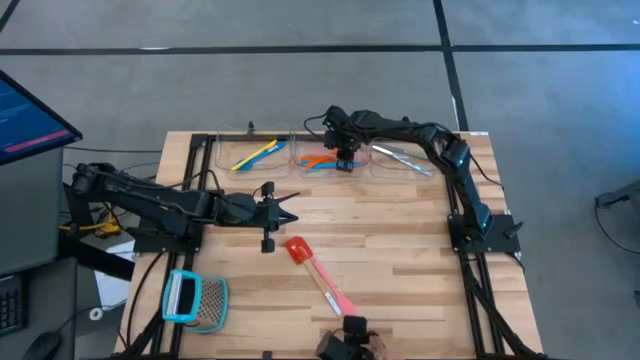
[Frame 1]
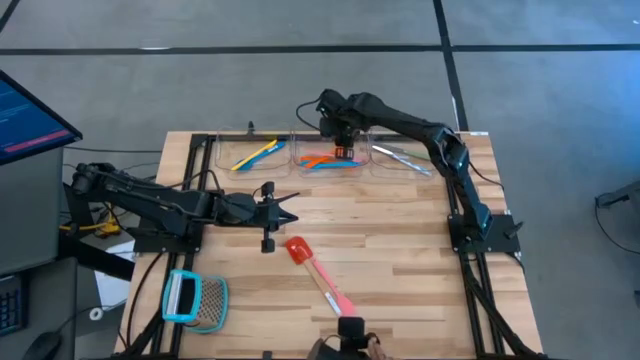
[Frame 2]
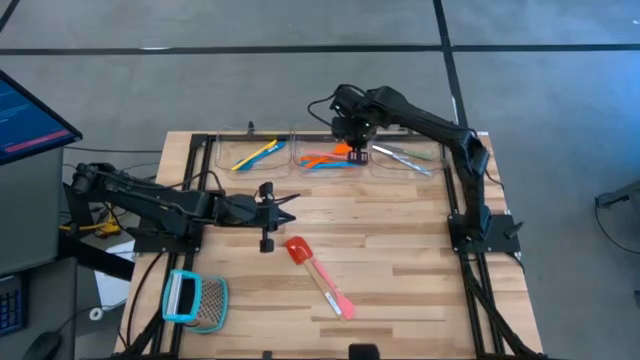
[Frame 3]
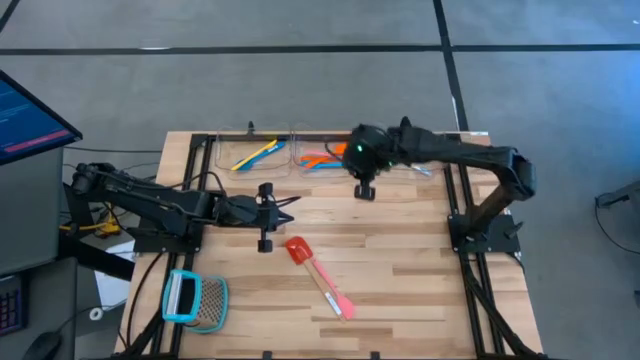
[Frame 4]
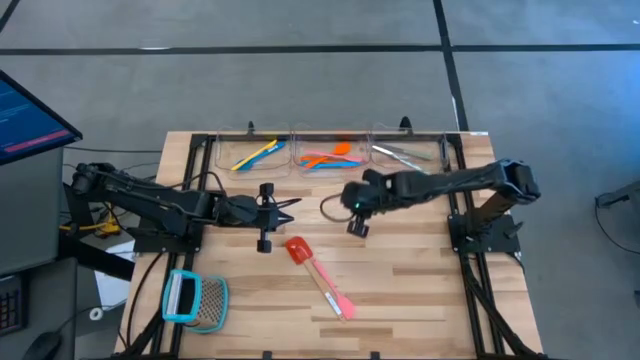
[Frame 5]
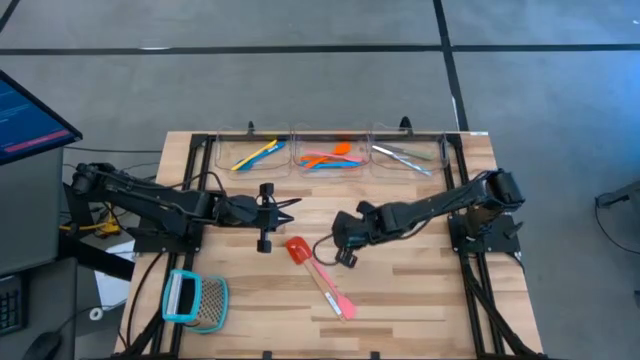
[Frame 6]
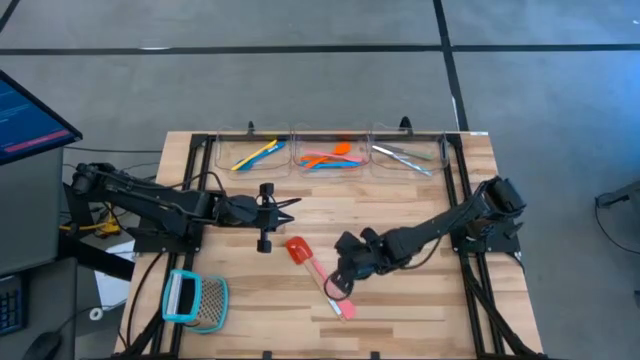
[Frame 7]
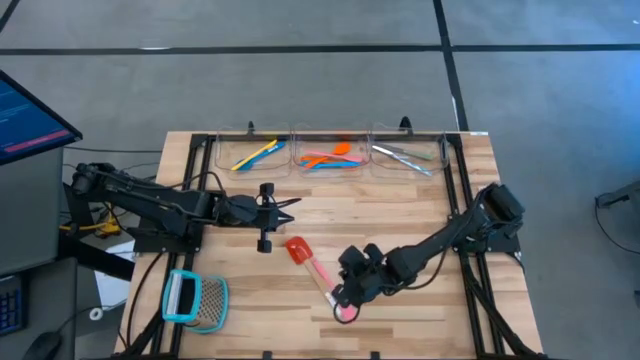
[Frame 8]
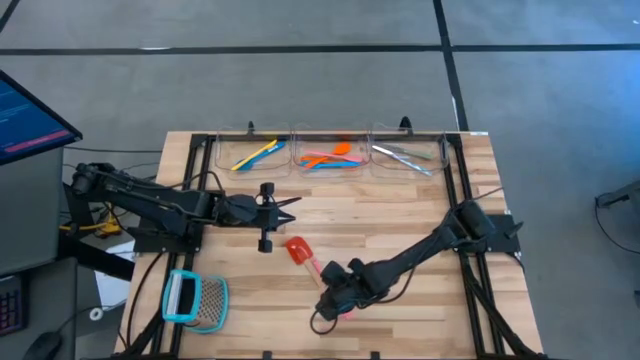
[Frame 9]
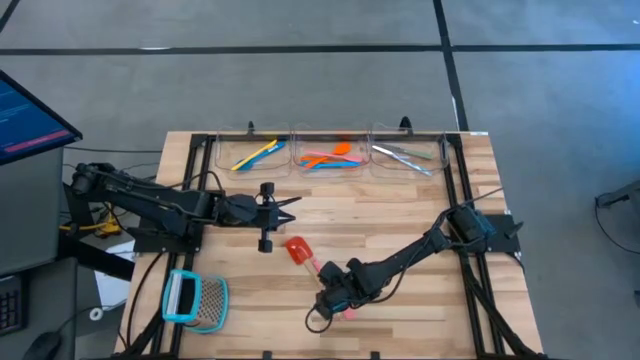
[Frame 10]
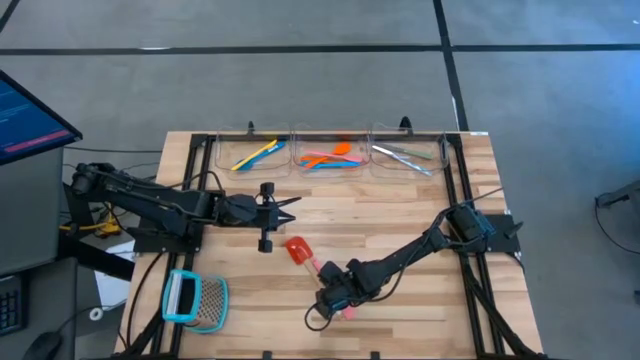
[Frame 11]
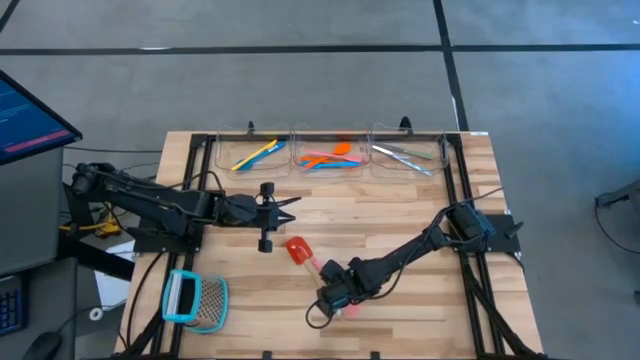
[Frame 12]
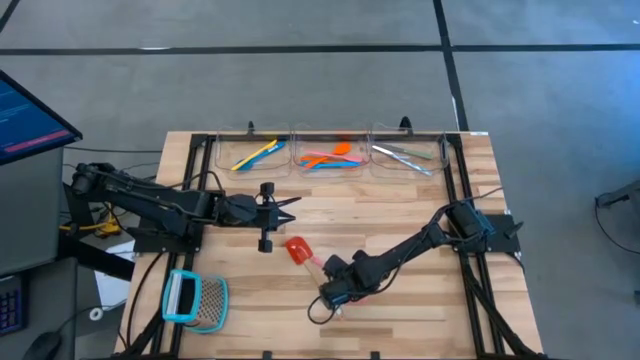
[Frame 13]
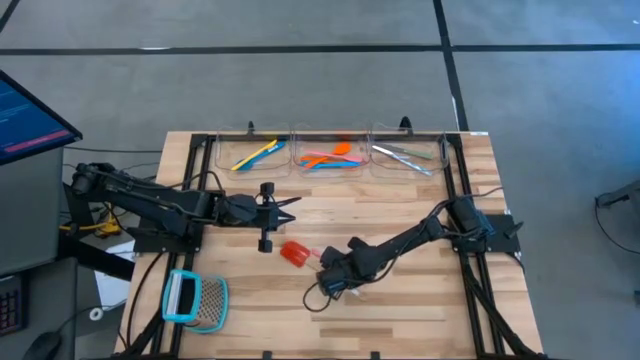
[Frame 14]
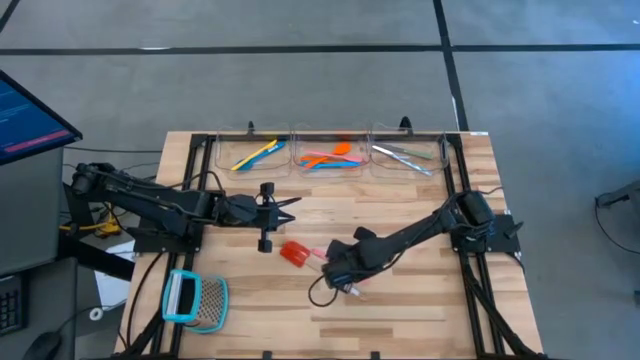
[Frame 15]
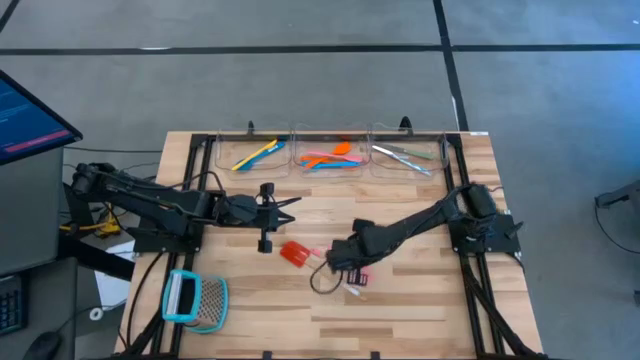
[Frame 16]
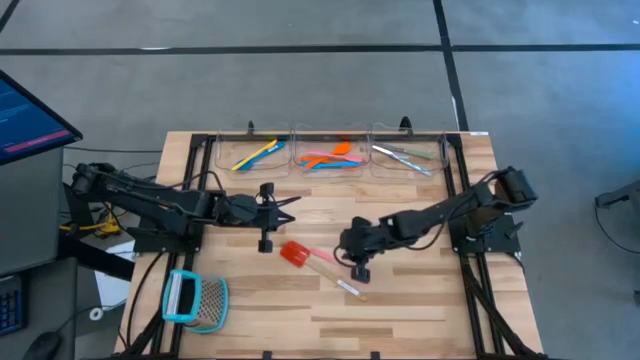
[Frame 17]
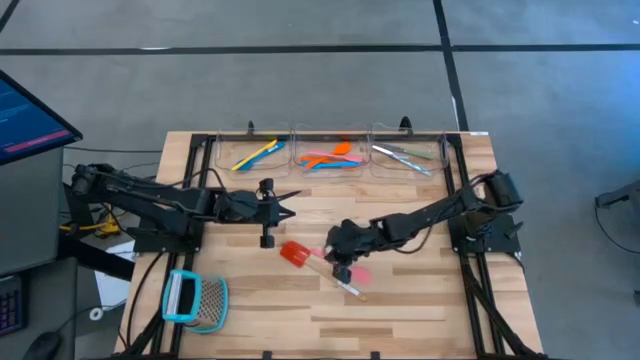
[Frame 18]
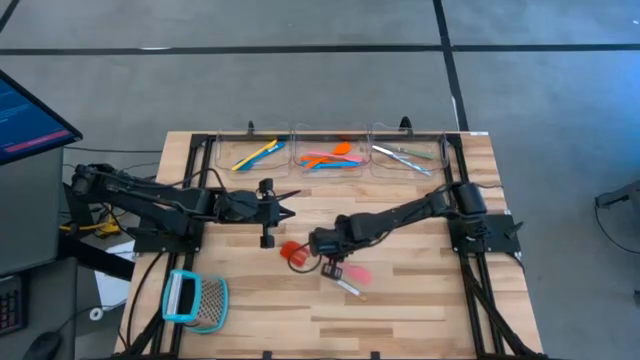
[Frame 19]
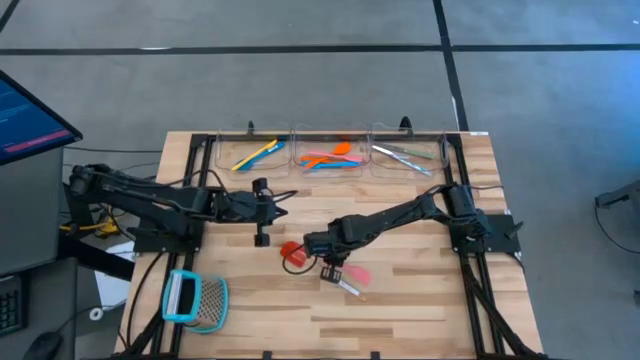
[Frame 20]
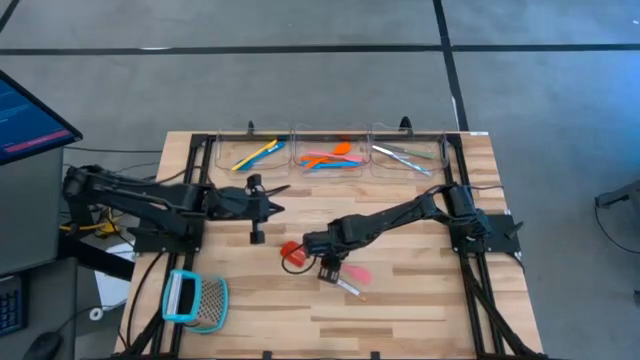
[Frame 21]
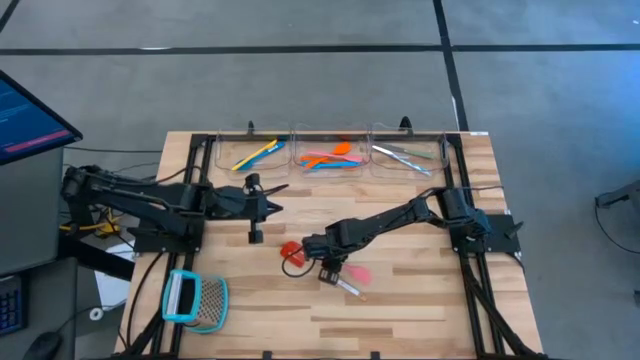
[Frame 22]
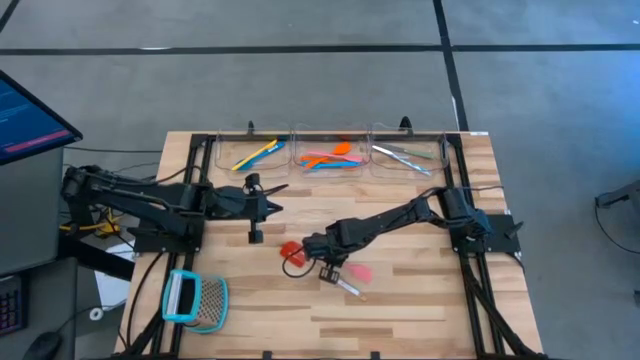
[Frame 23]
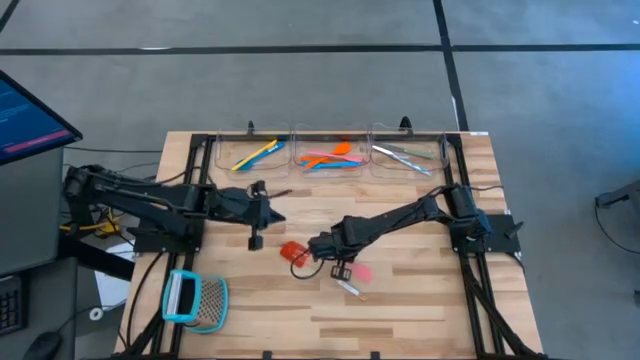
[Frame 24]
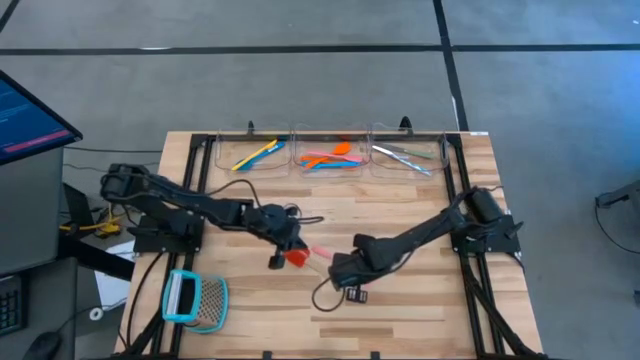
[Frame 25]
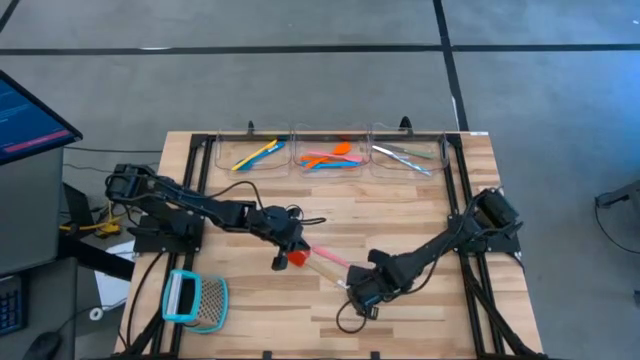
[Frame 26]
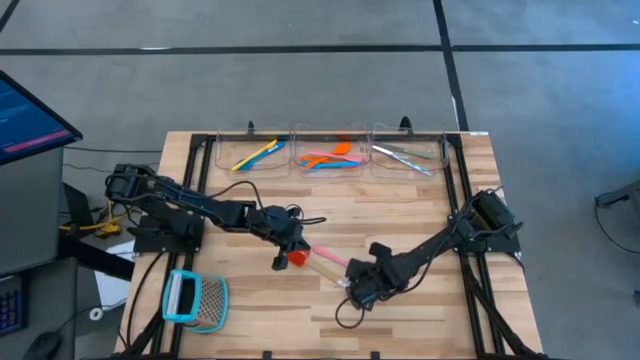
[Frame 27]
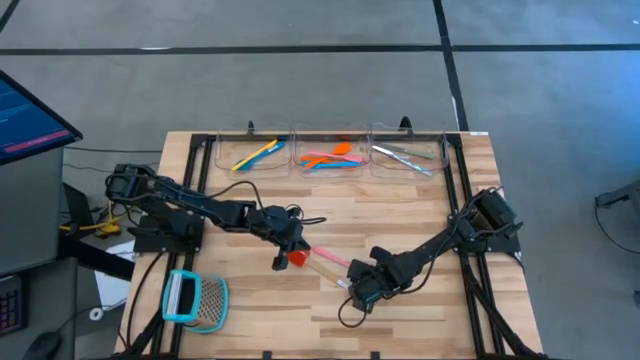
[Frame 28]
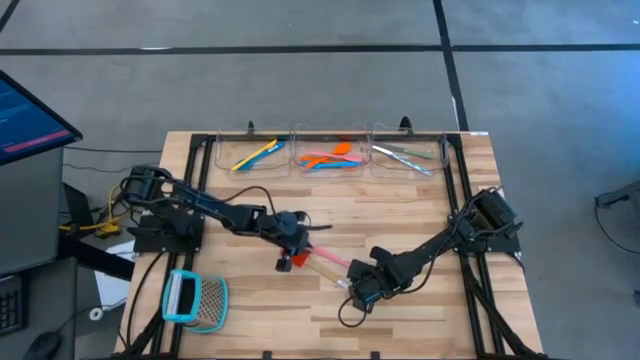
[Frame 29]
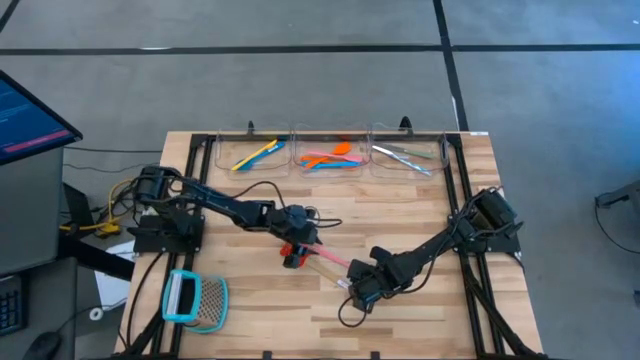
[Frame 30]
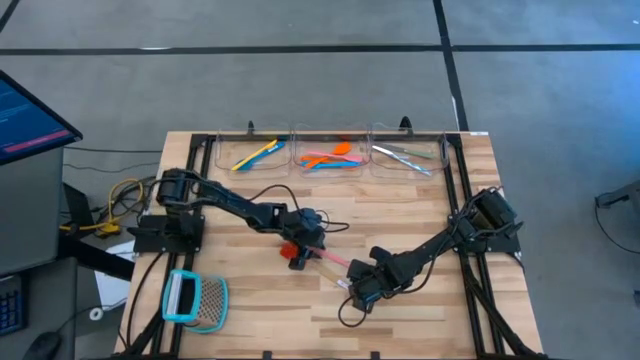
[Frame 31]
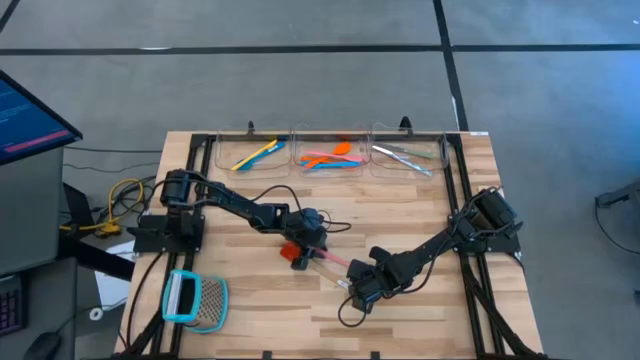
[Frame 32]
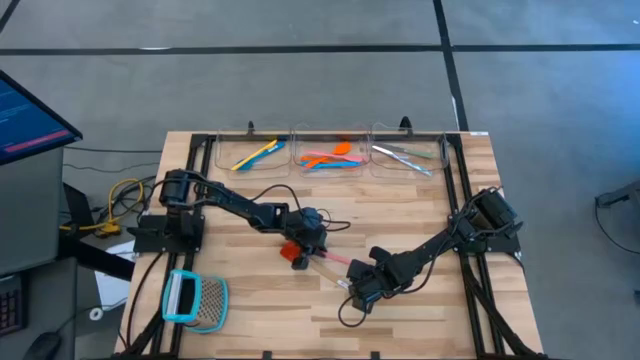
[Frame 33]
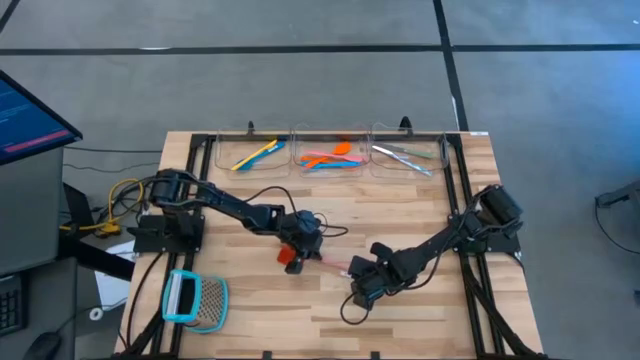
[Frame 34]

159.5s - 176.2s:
Task: Pick & Place Kitchen Items
Put the pink spatula into the middle transparent bin

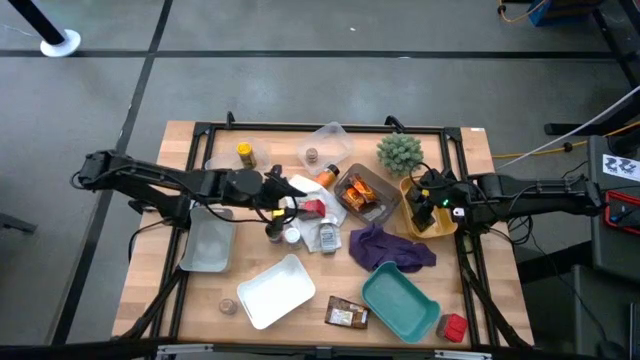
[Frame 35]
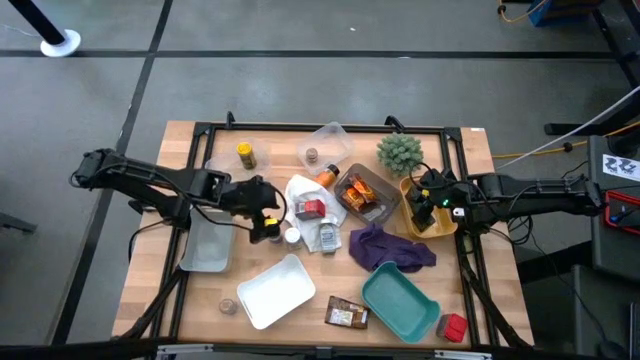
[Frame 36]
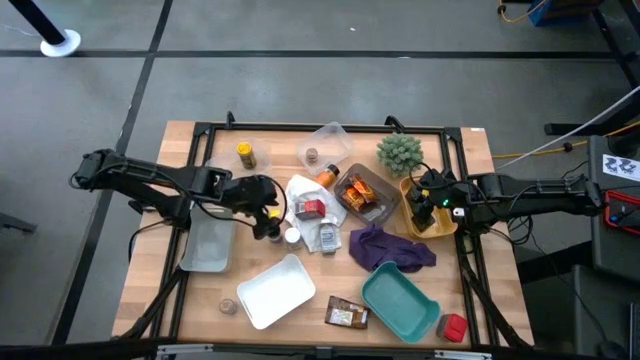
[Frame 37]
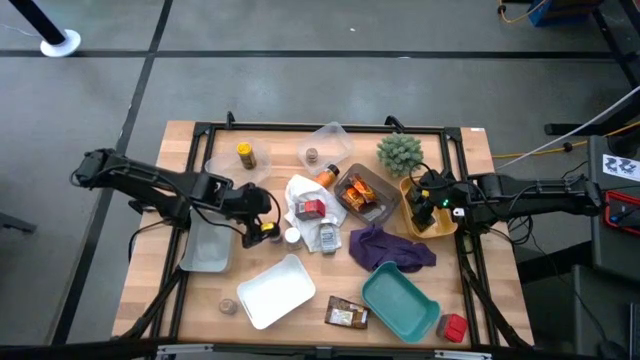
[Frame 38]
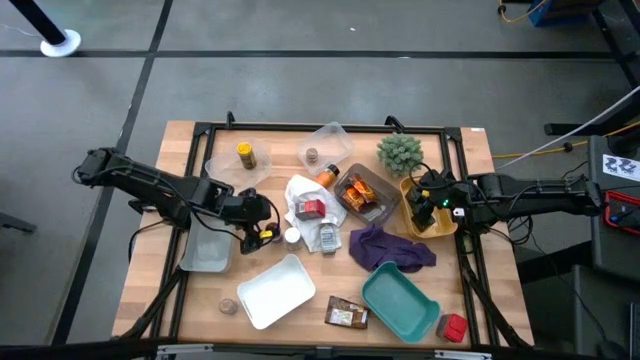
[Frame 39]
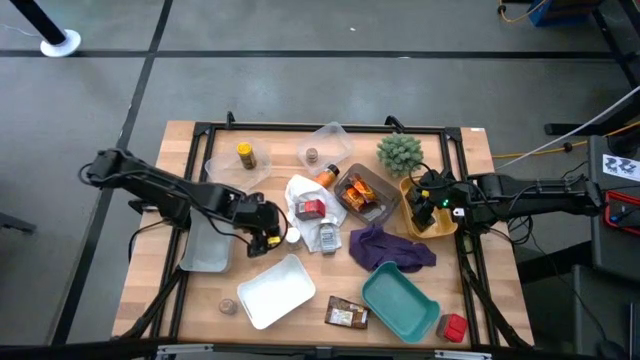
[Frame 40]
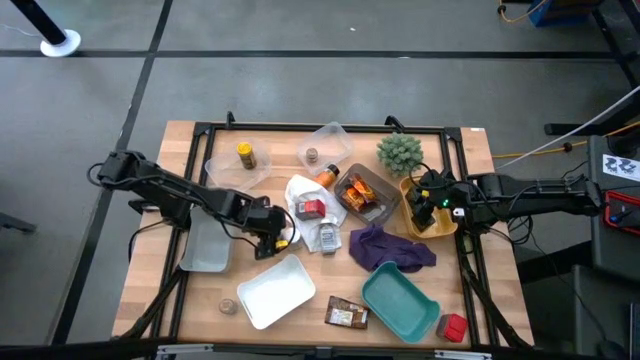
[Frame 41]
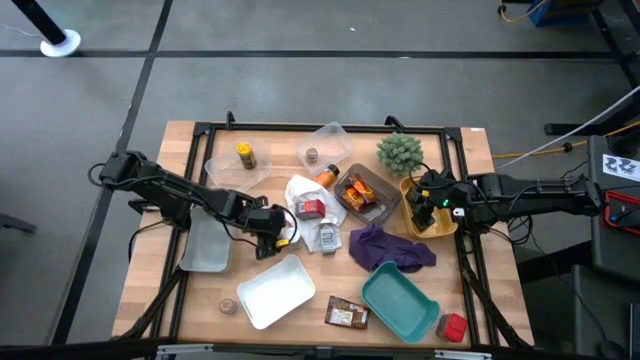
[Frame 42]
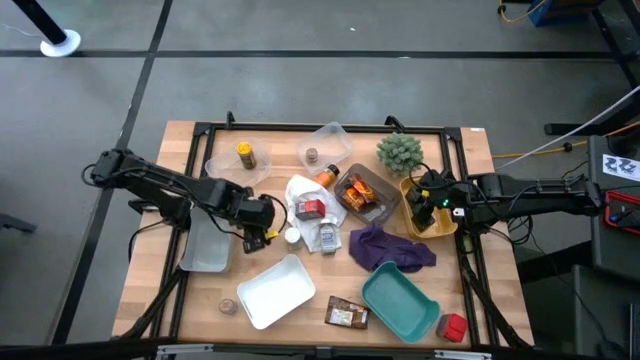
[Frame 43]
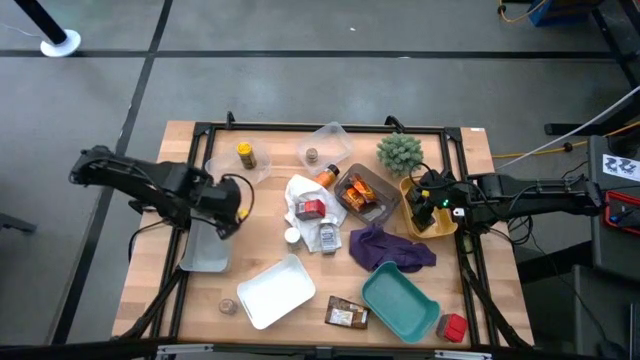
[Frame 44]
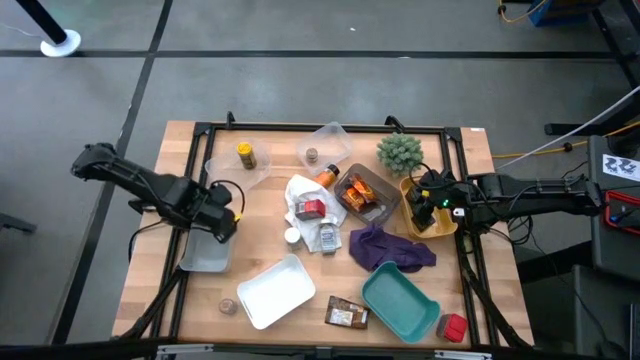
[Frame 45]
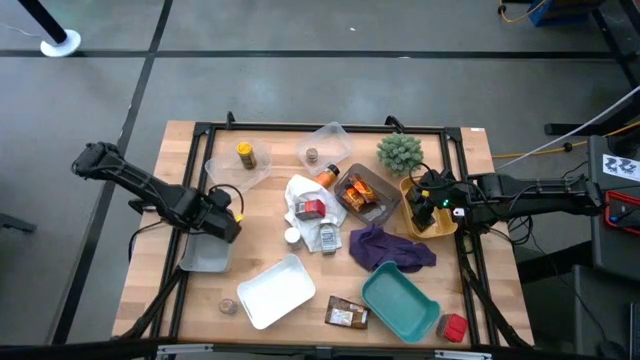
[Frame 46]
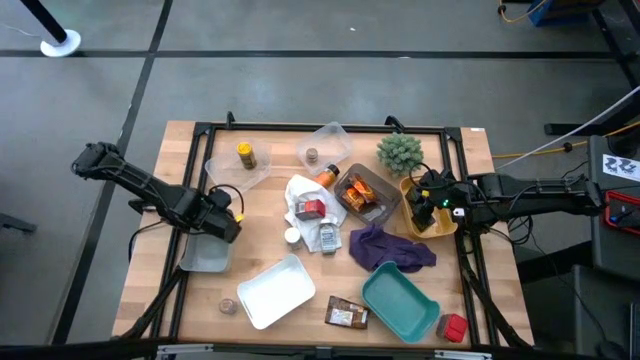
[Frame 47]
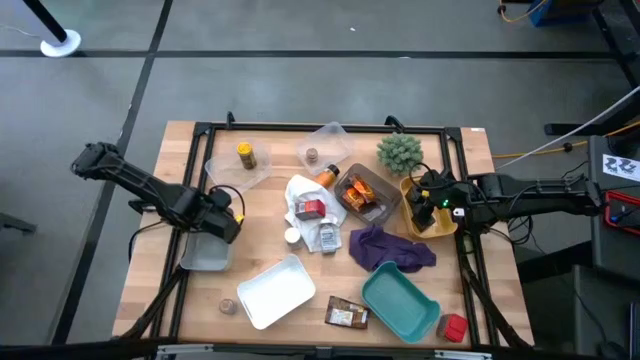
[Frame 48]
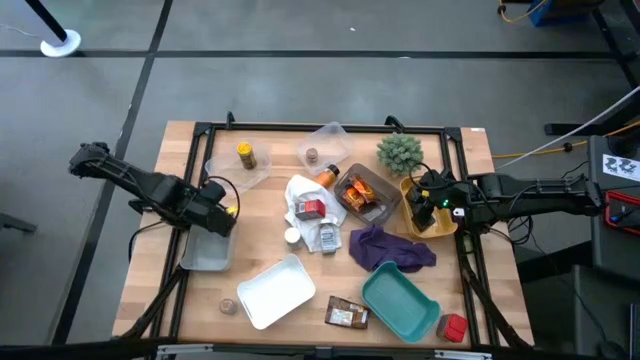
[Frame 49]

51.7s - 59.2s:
Task: Sort spices by type
Put the violet spice bottle into the gray bin
